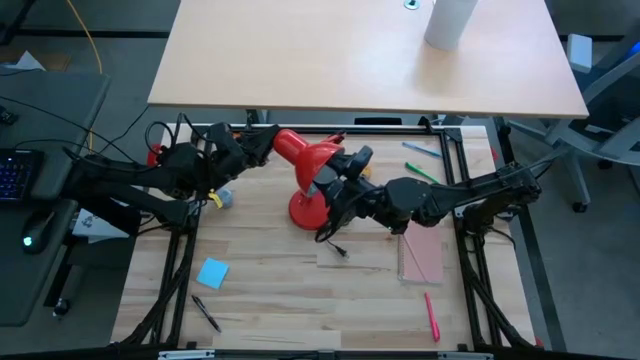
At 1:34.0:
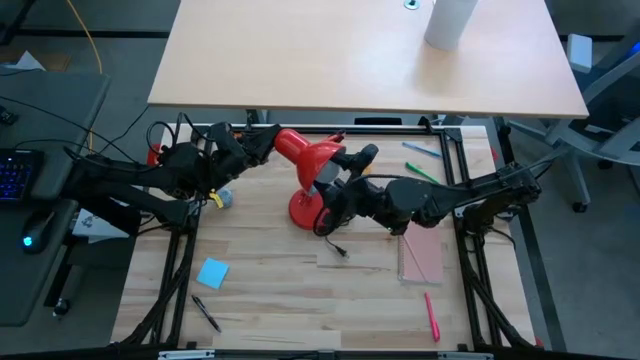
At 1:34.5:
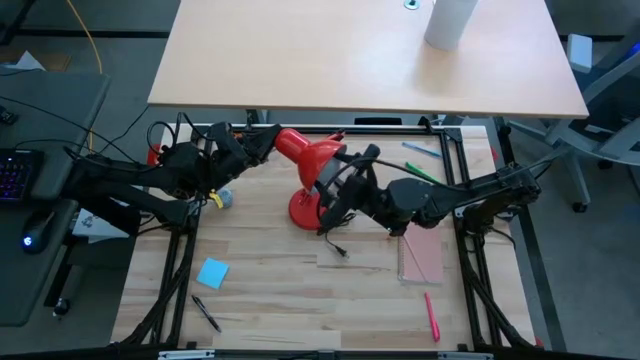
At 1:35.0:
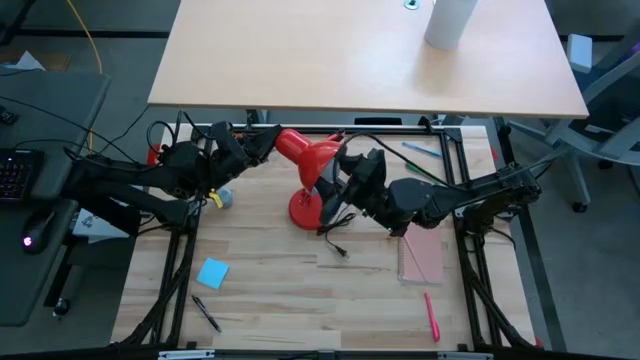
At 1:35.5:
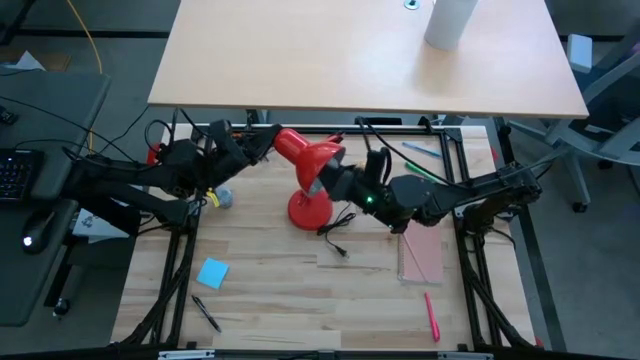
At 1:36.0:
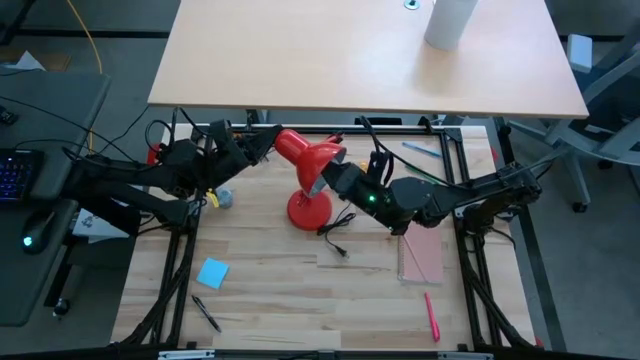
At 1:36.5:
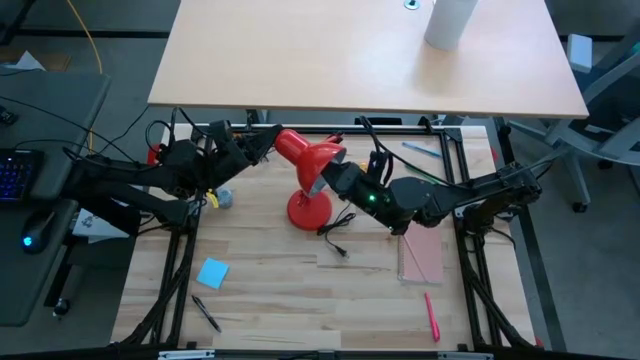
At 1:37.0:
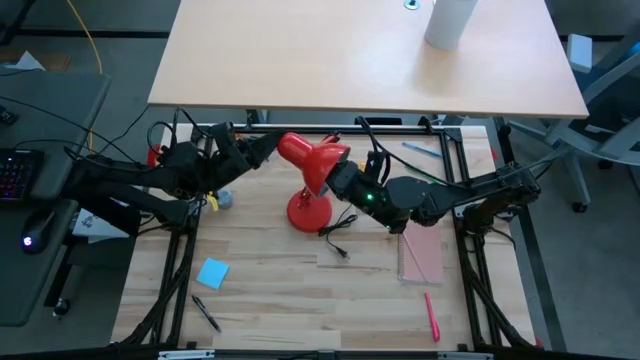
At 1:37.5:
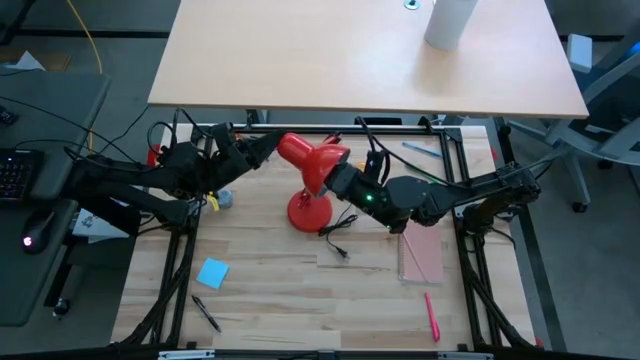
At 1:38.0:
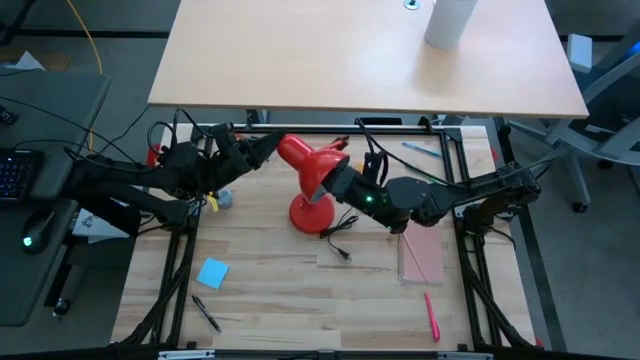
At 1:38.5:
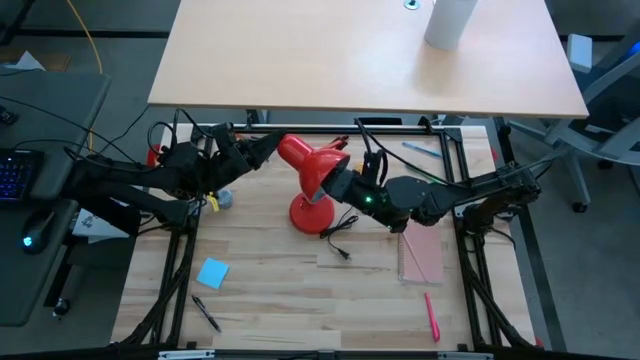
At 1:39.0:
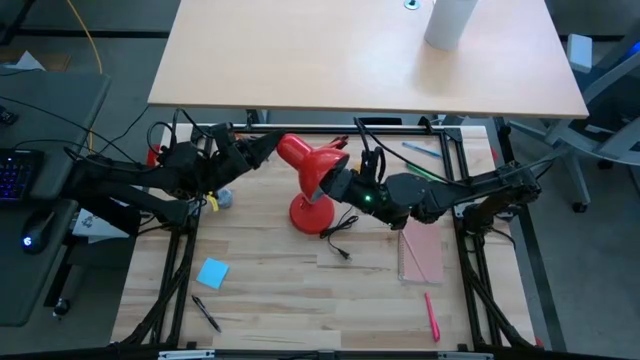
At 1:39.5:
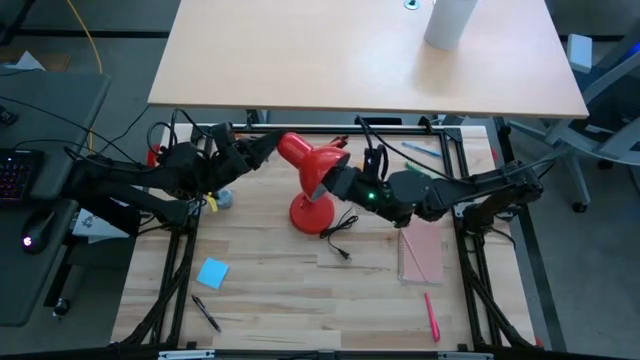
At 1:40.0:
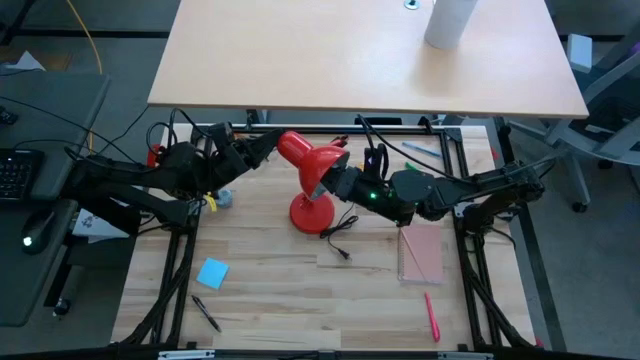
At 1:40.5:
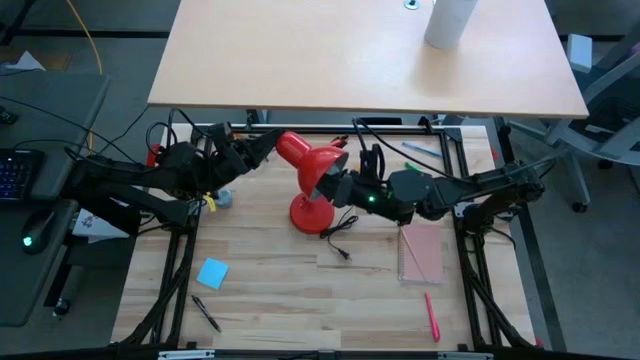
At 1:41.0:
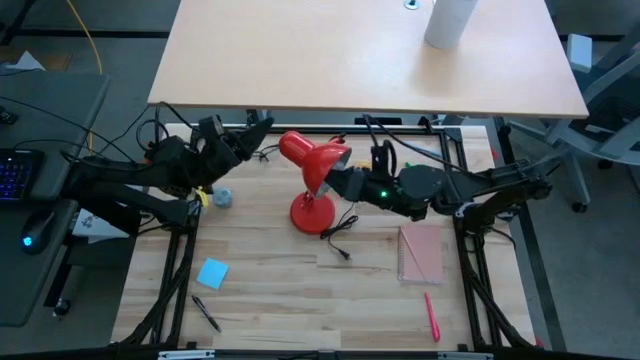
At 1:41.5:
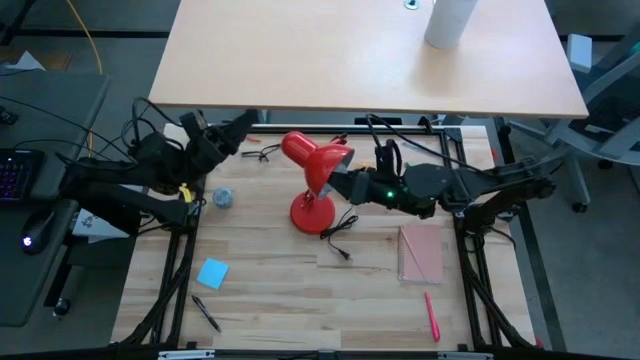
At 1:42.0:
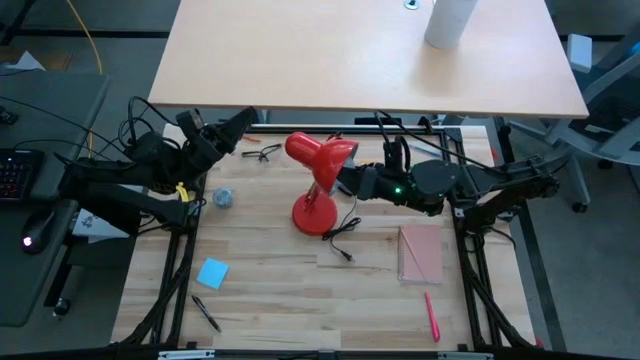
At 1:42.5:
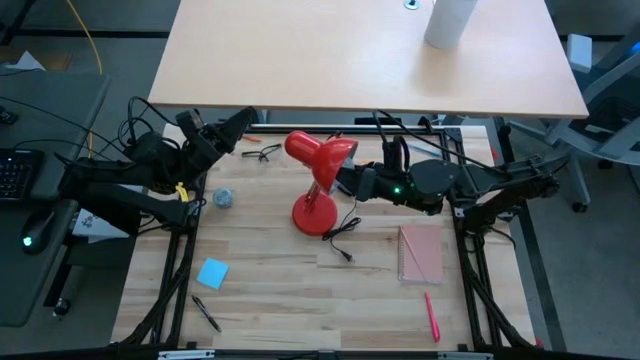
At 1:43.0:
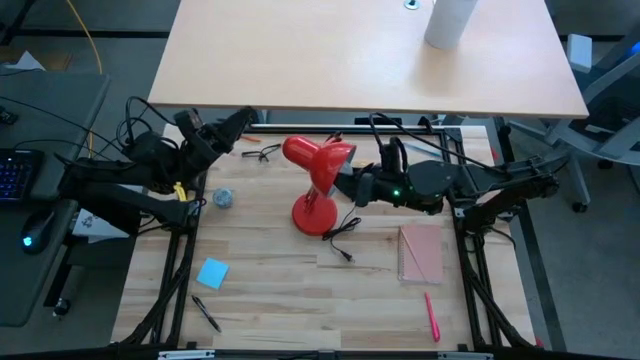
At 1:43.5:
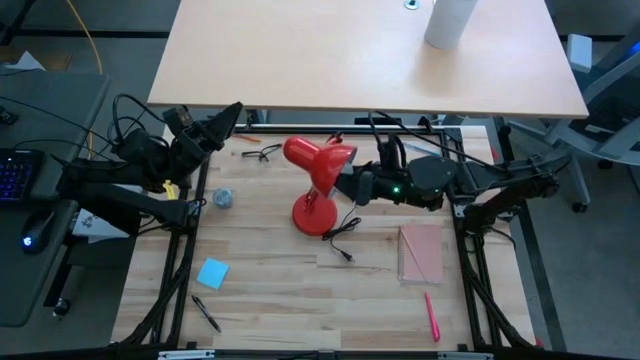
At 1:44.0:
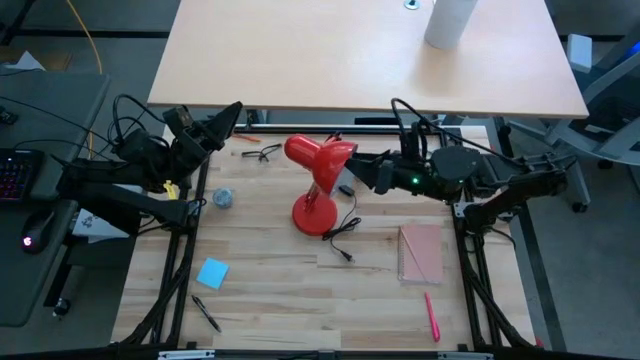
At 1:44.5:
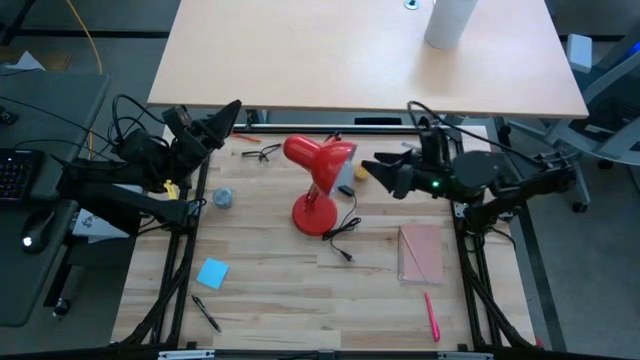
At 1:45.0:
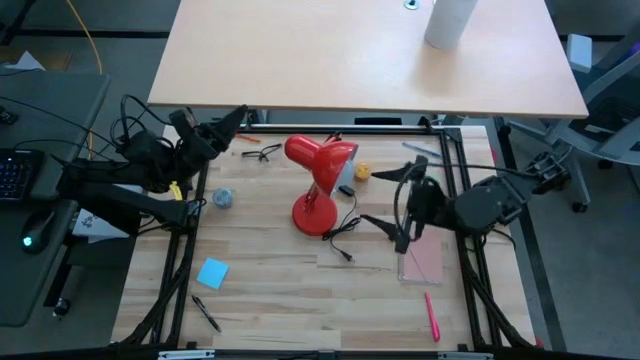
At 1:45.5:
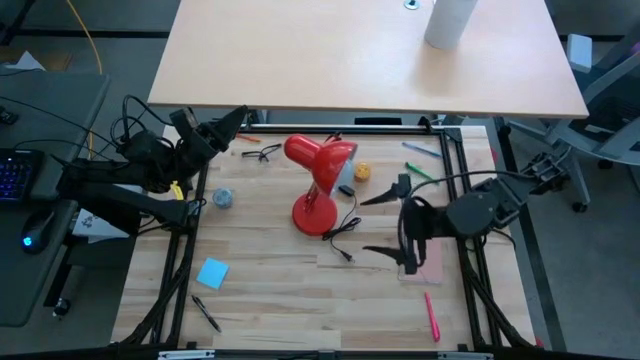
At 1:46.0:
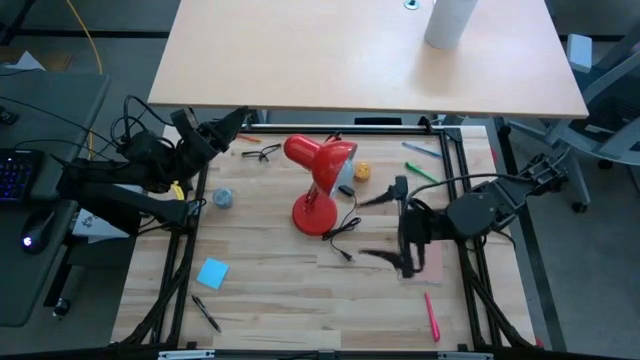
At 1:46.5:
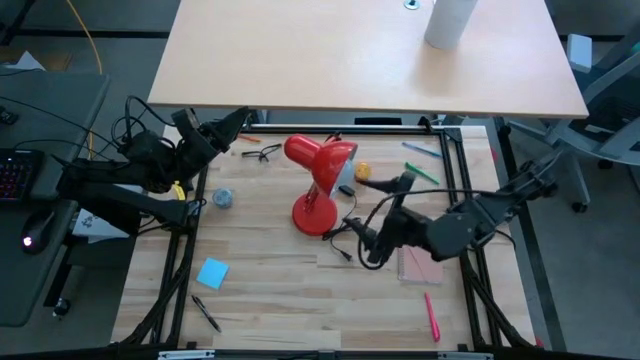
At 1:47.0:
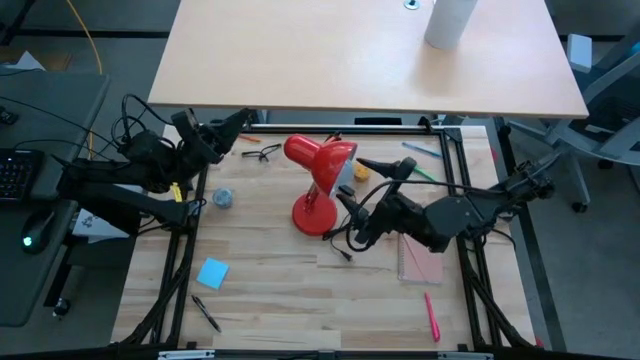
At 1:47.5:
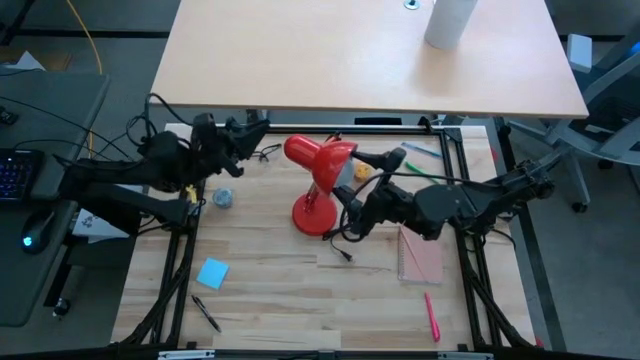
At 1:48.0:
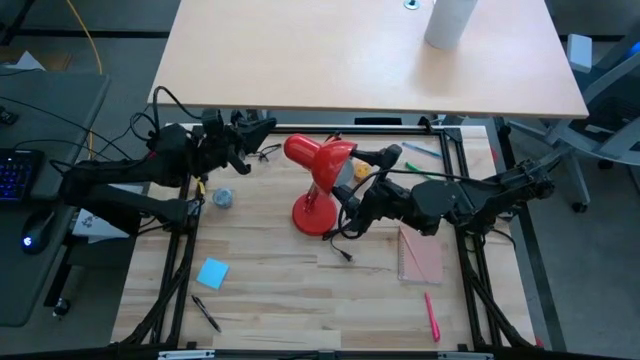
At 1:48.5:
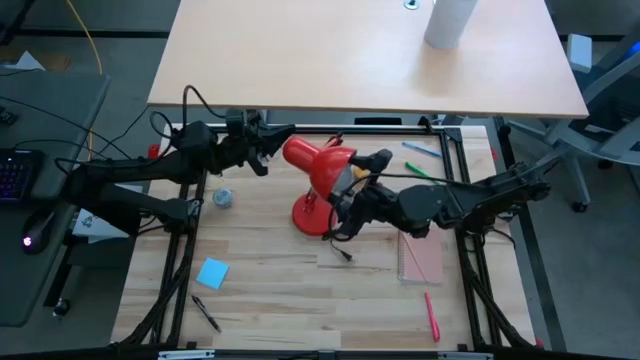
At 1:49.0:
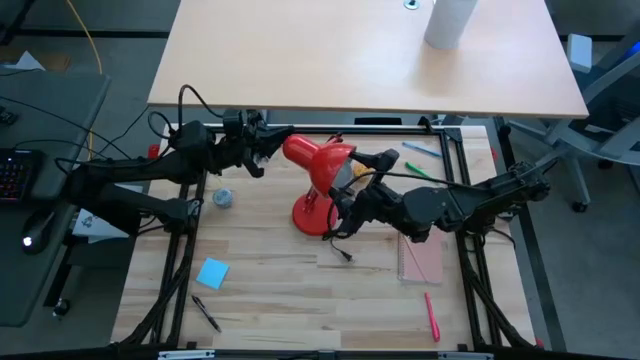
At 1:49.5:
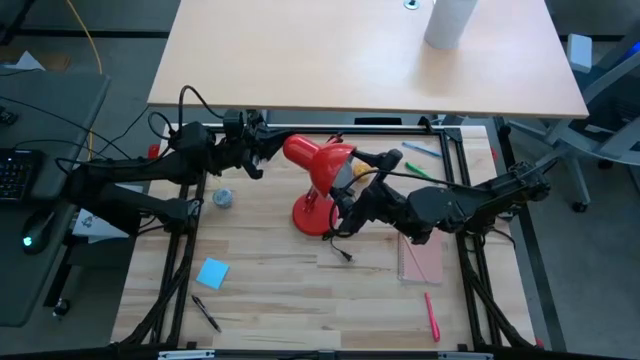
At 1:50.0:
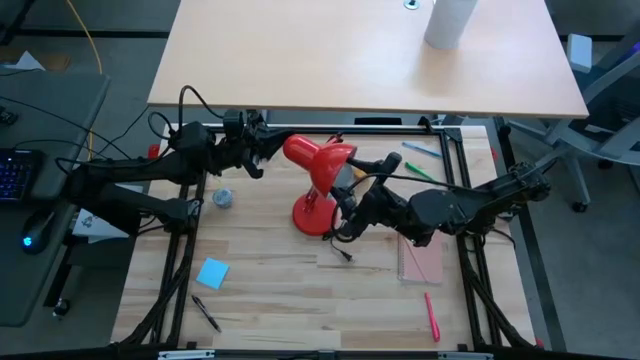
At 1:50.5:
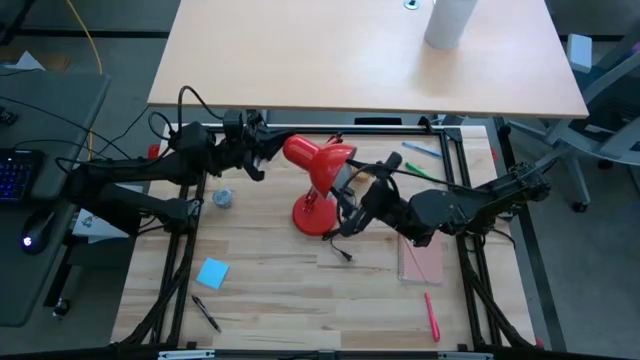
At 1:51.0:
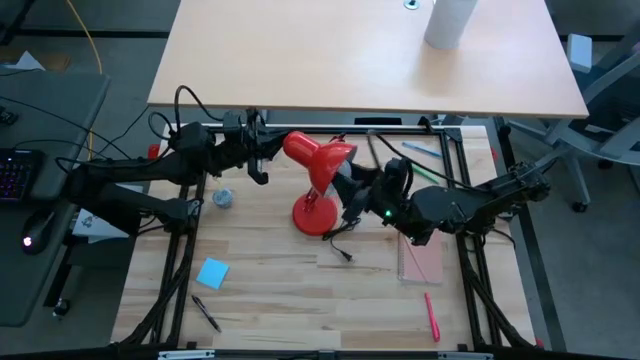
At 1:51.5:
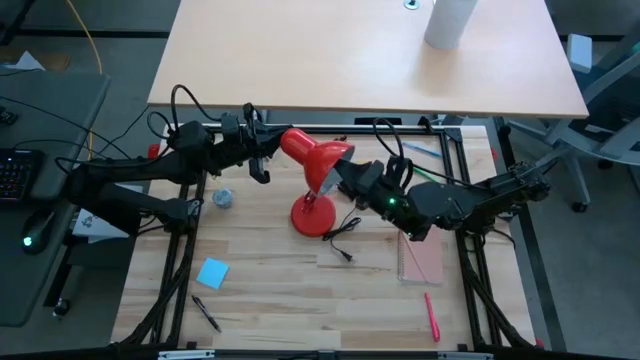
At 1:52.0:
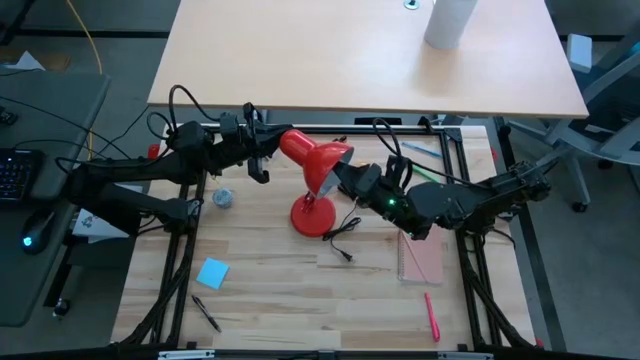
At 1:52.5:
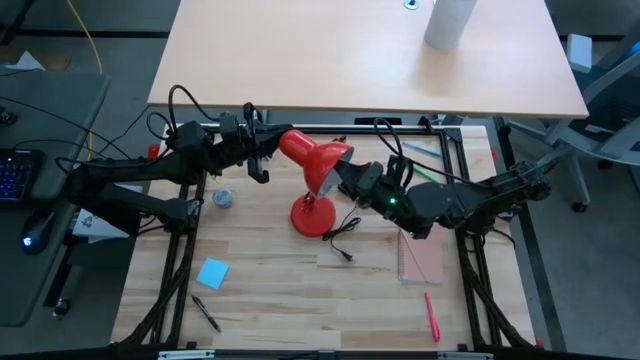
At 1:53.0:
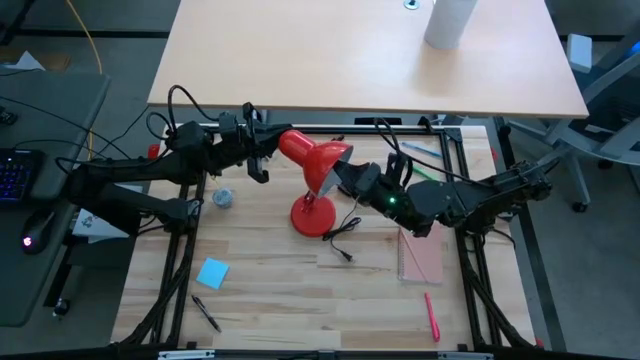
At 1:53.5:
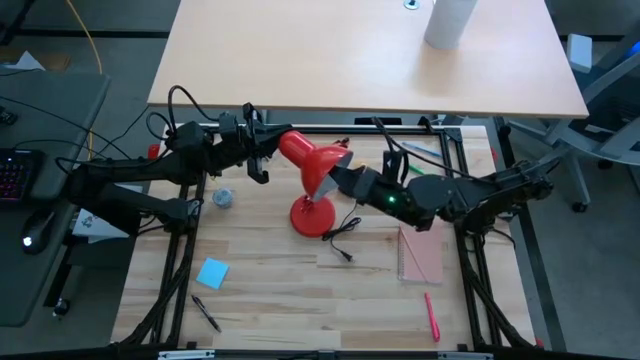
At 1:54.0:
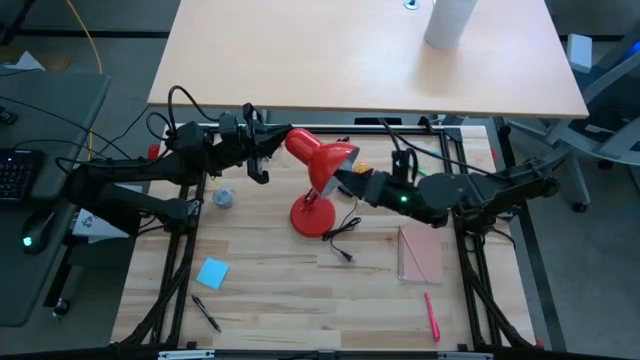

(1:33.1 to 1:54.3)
Task: Screw lightbulb
Insert the lightbulb into the lamp
